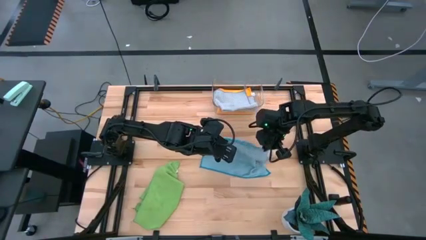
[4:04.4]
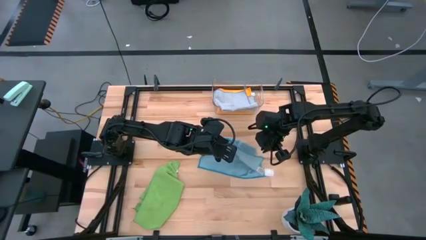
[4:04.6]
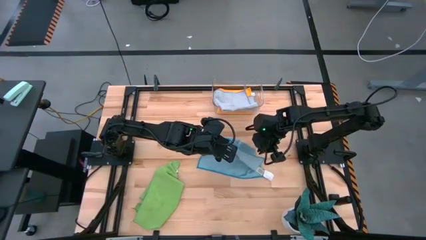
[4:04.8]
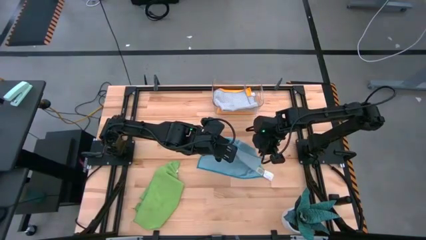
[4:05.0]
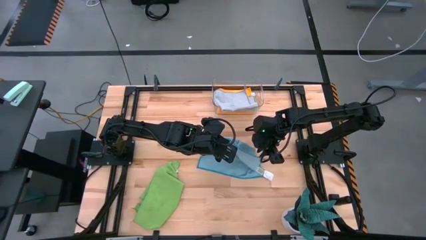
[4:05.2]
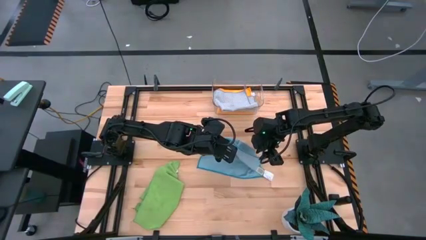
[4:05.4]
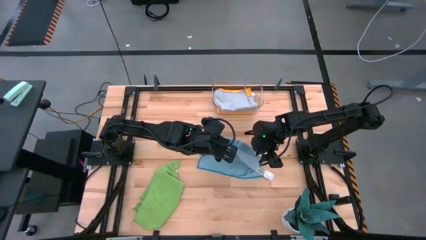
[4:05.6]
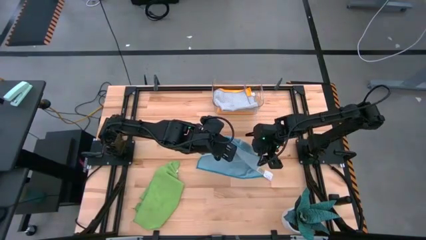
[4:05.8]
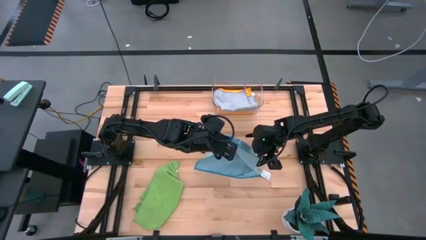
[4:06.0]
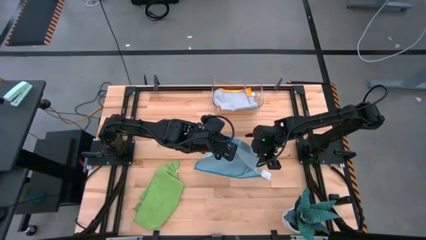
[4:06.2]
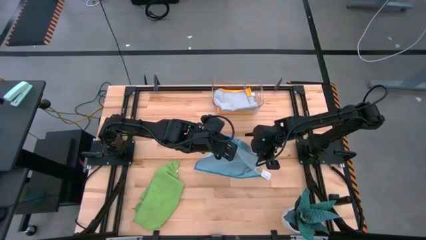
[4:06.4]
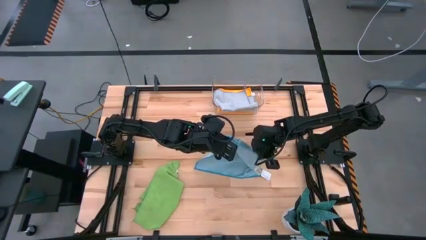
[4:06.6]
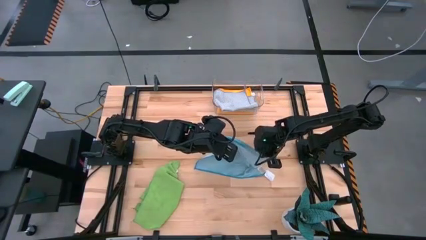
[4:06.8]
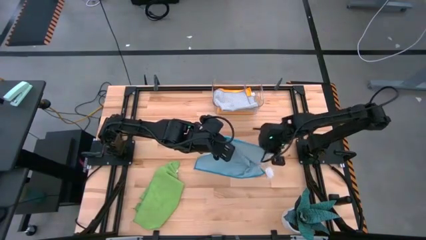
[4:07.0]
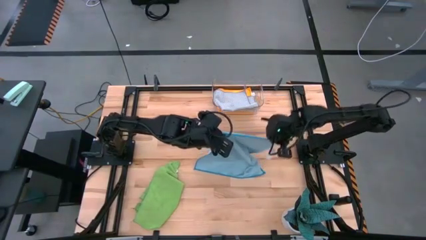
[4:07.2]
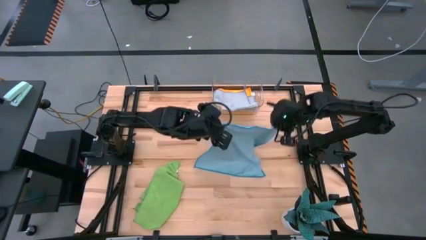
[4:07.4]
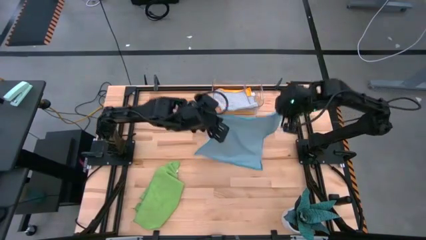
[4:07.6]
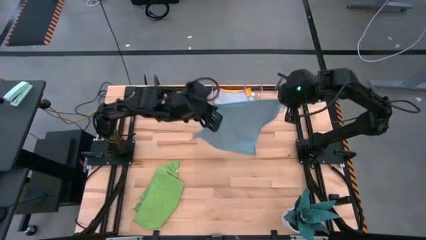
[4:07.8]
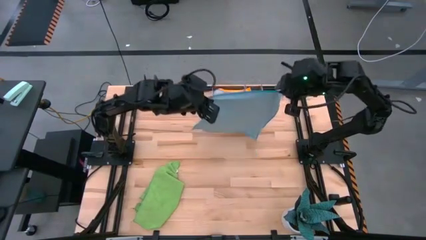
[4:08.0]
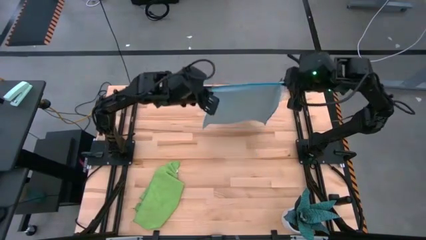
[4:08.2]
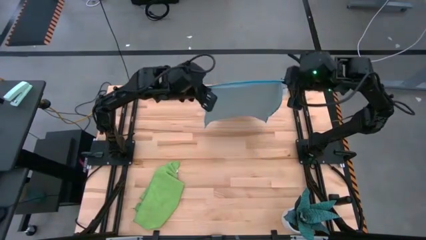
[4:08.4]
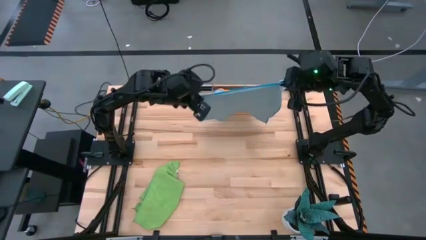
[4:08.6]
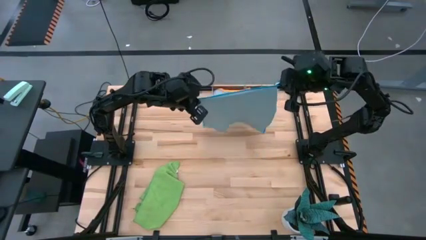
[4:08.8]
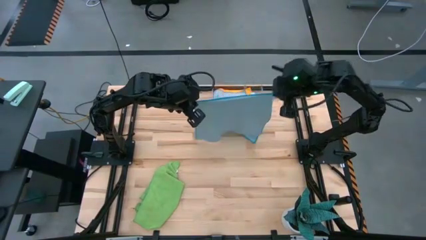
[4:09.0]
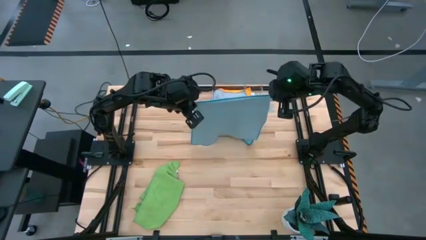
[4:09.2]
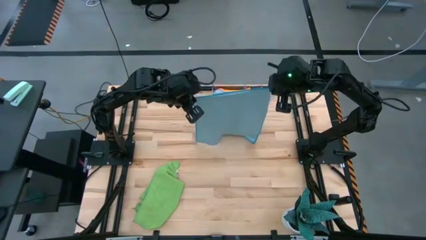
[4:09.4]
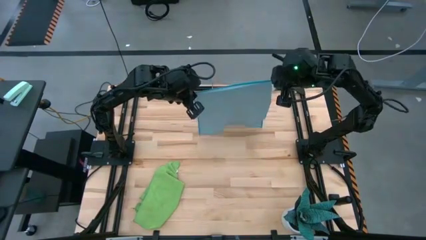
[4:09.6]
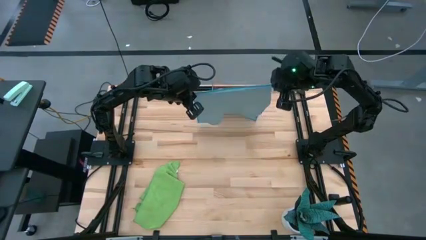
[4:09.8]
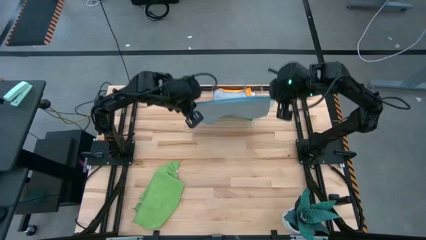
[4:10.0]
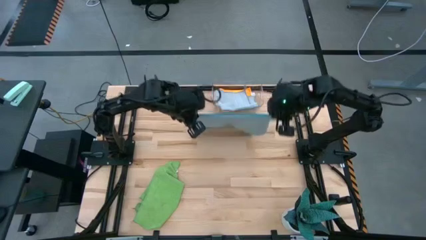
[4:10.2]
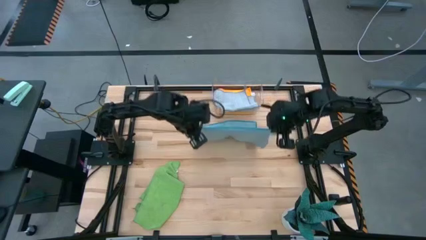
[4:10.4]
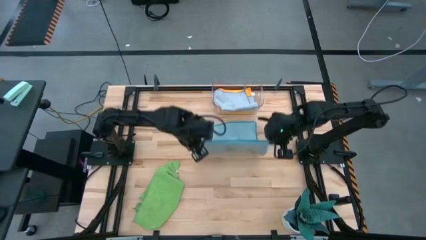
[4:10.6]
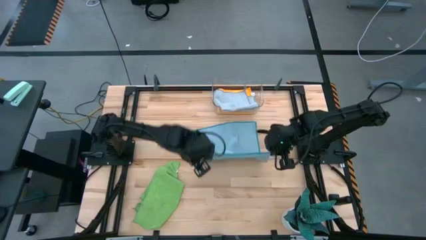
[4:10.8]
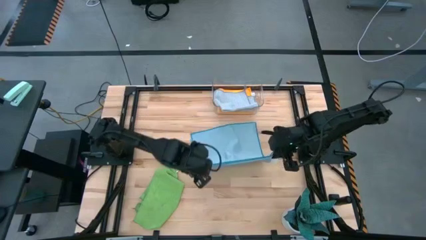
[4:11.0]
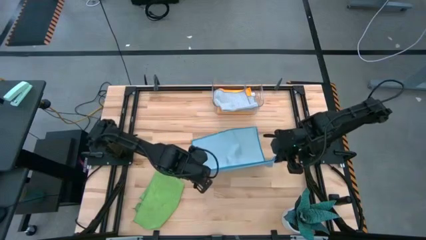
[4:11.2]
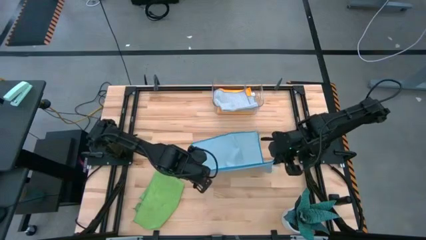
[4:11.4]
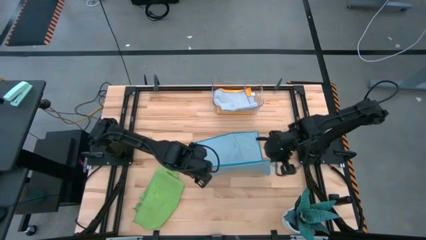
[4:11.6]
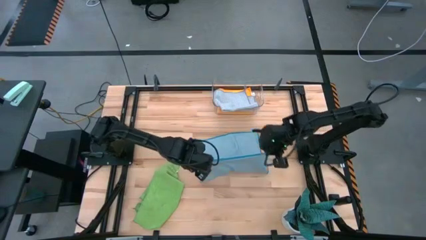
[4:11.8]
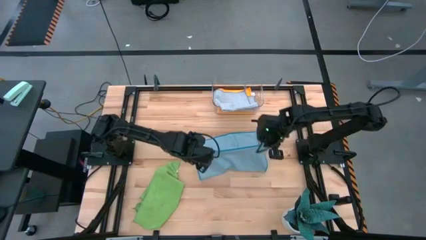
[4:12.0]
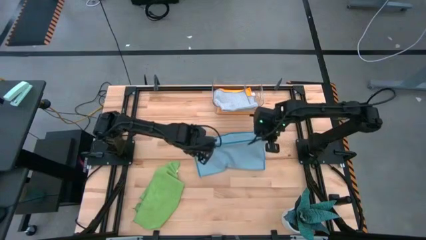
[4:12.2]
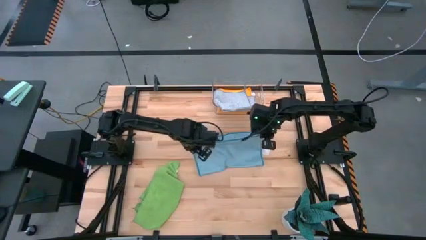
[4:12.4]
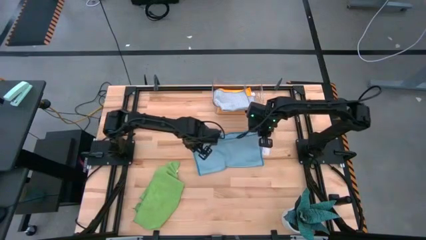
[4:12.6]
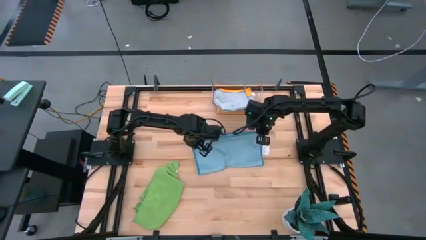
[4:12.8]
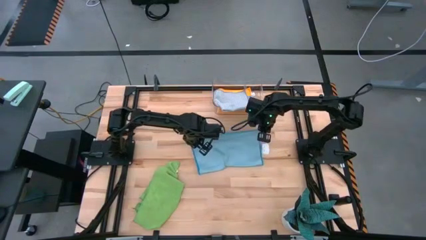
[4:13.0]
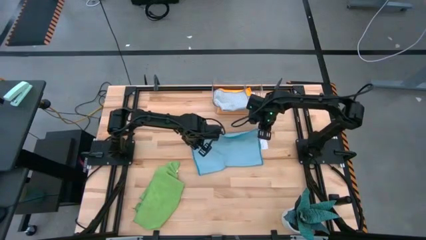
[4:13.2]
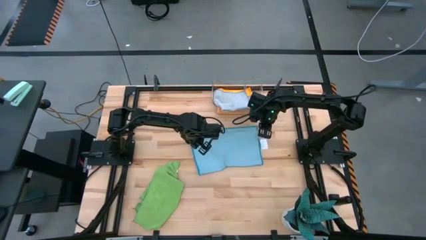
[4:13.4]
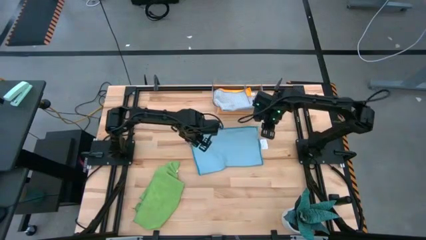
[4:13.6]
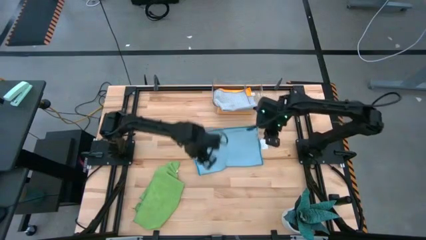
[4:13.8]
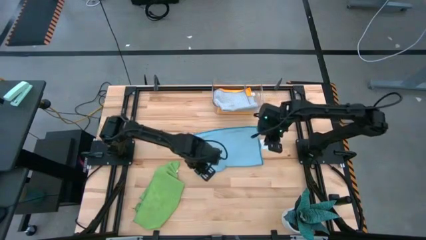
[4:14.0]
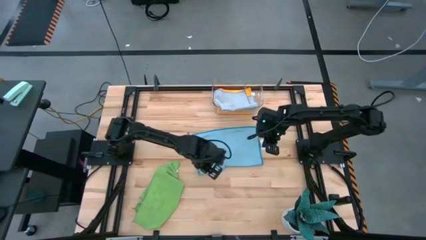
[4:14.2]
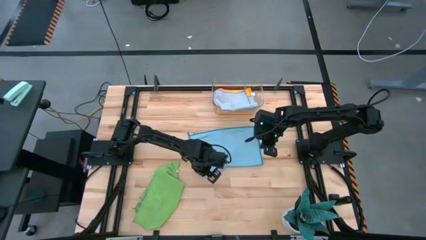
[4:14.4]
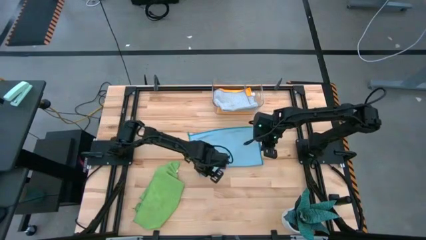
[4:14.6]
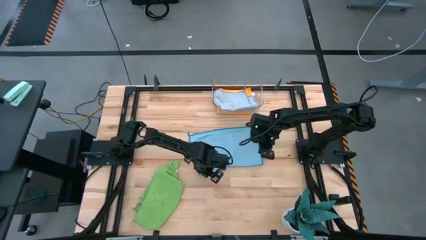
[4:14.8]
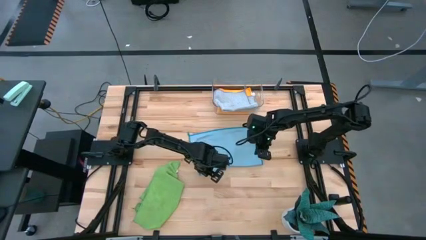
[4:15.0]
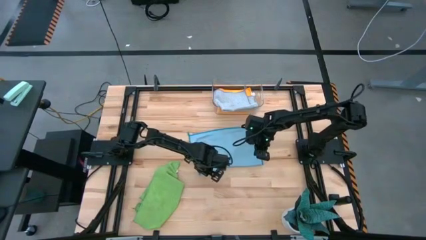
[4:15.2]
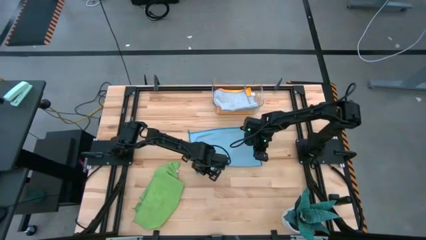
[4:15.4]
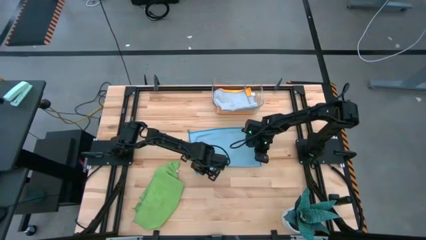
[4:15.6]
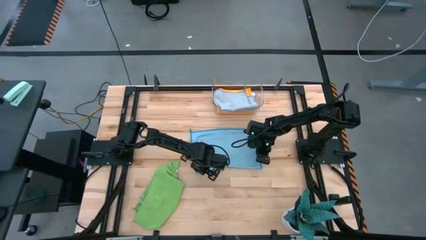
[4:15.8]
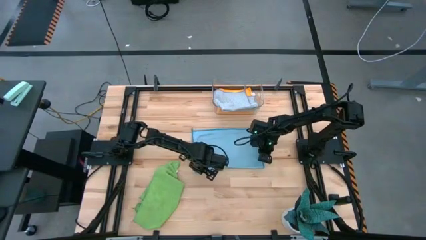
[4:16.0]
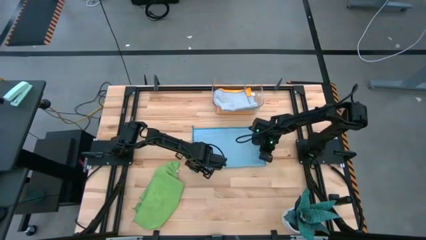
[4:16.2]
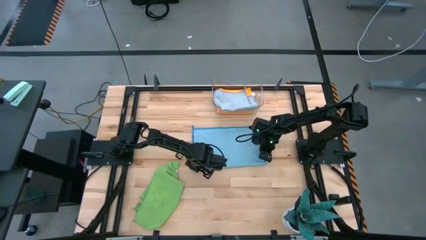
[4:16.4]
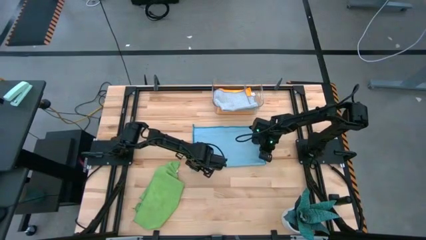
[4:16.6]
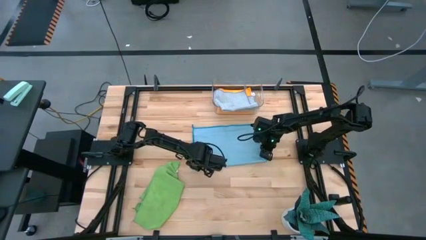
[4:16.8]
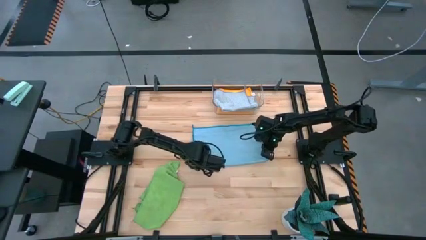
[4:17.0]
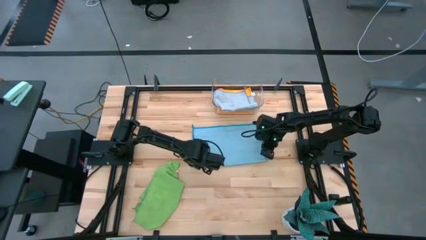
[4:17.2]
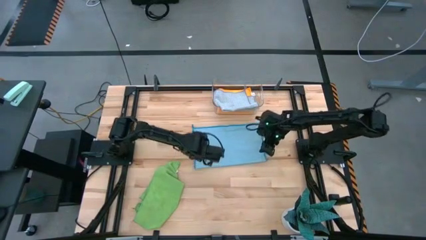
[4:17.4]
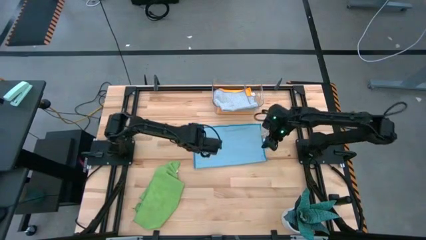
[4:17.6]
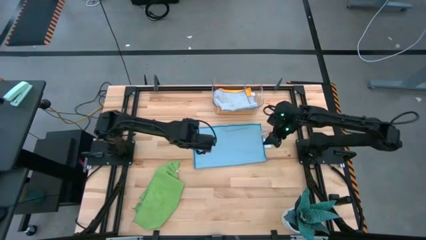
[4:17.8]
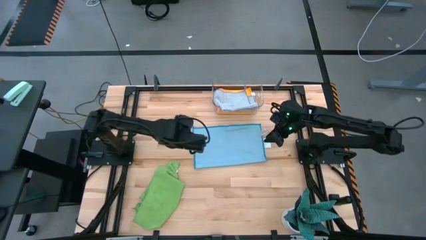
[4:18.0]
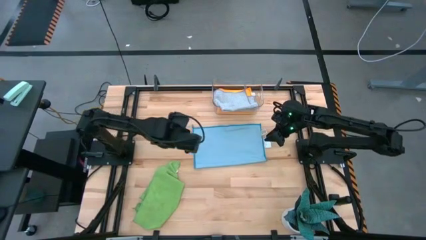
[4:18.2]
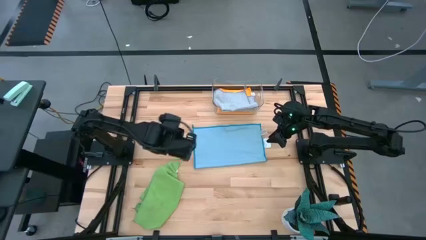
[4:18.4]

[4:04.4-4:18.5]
Task: Fold microfiber towels
Fold the blue microfiber cloth
